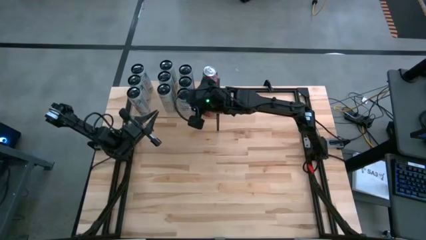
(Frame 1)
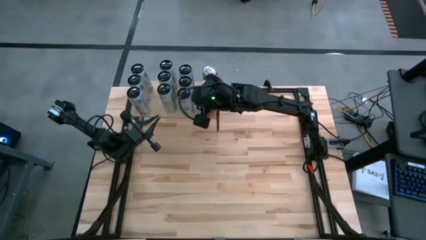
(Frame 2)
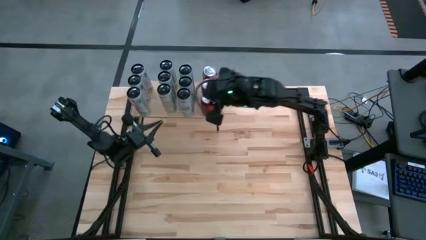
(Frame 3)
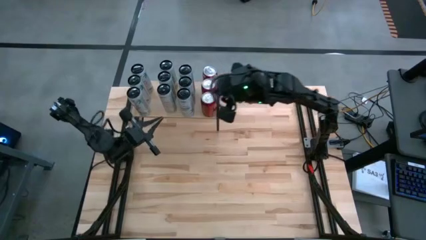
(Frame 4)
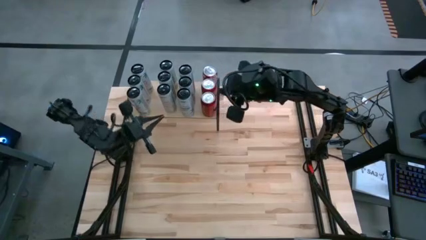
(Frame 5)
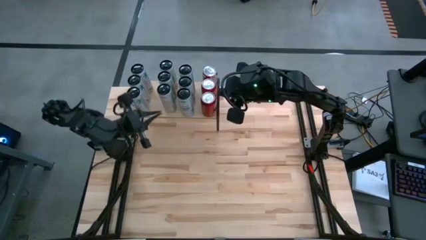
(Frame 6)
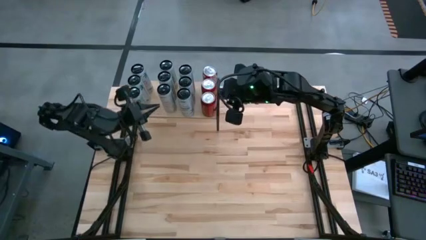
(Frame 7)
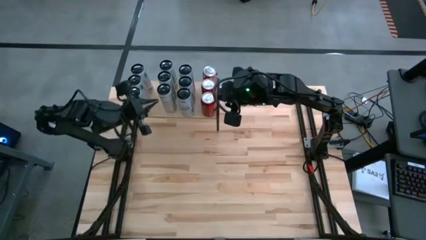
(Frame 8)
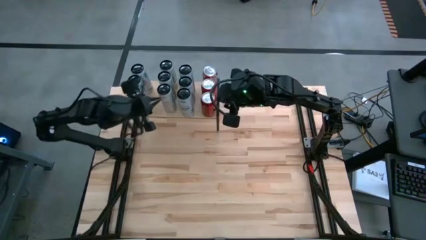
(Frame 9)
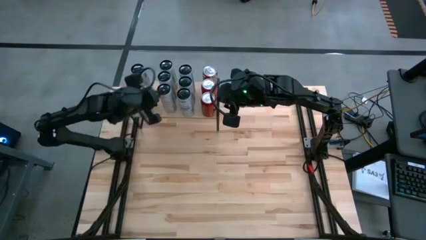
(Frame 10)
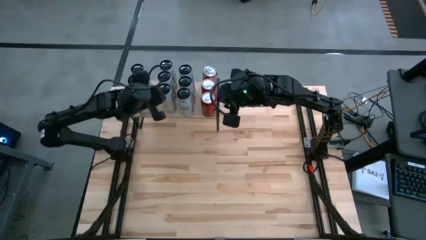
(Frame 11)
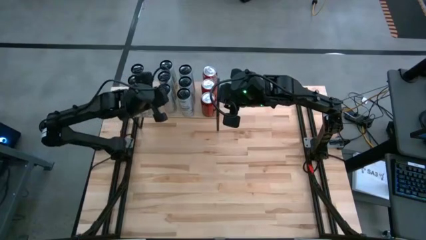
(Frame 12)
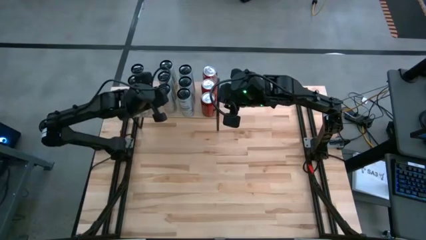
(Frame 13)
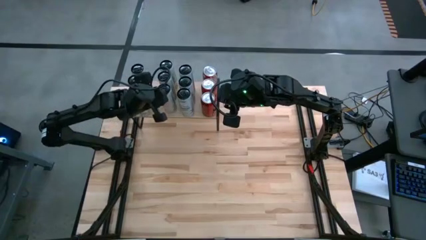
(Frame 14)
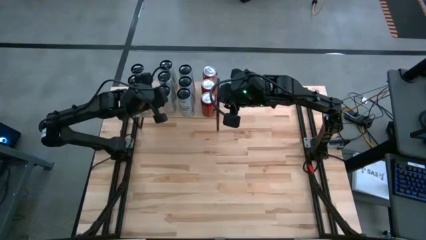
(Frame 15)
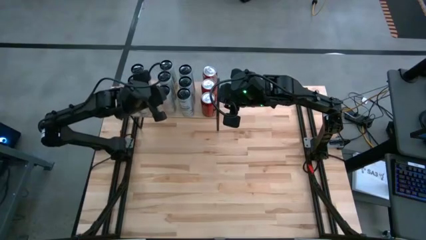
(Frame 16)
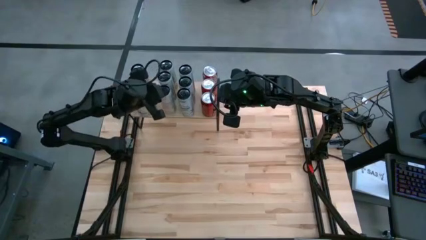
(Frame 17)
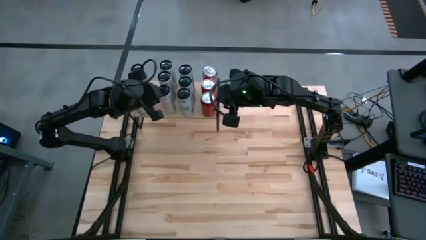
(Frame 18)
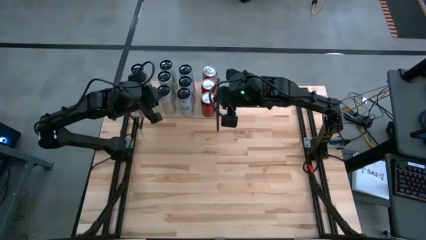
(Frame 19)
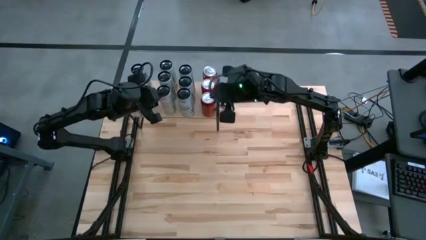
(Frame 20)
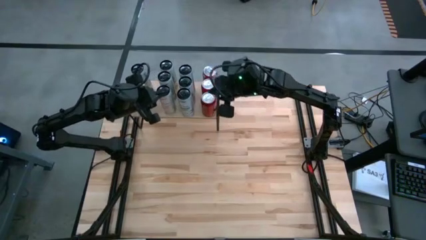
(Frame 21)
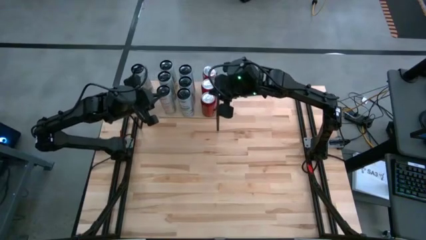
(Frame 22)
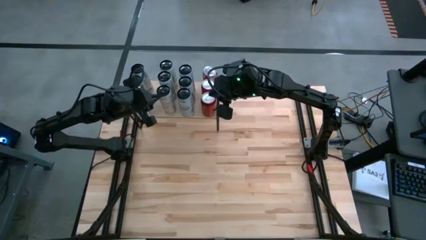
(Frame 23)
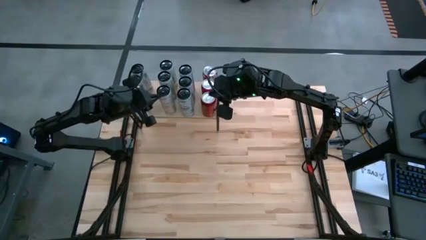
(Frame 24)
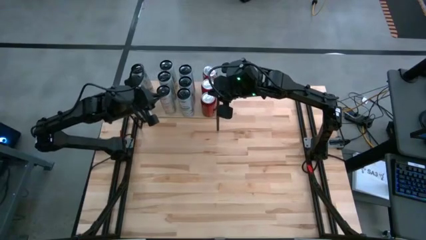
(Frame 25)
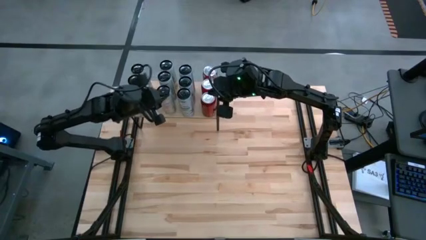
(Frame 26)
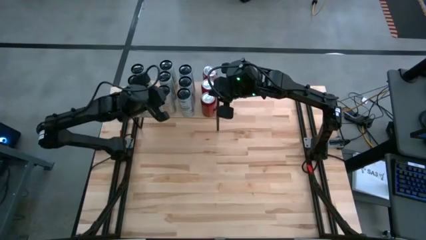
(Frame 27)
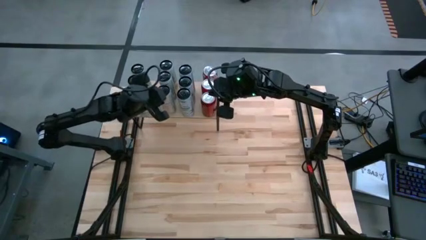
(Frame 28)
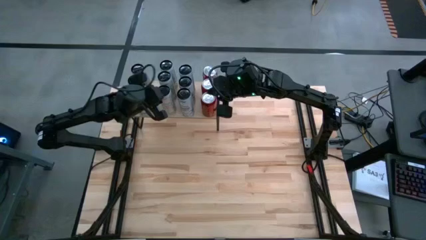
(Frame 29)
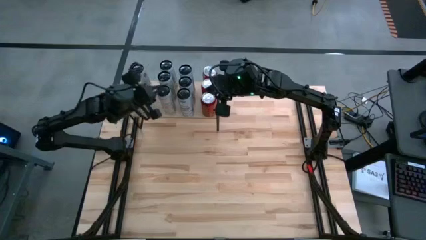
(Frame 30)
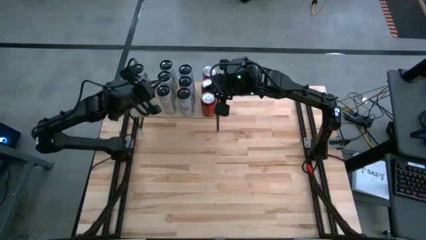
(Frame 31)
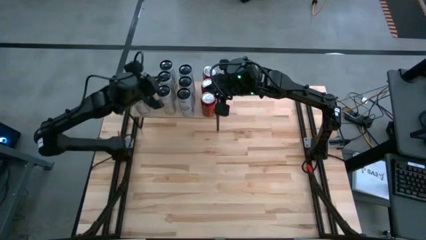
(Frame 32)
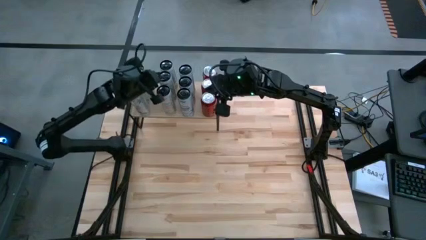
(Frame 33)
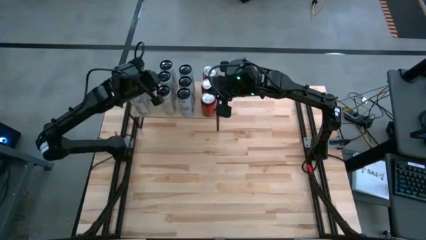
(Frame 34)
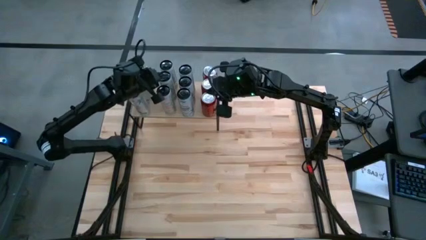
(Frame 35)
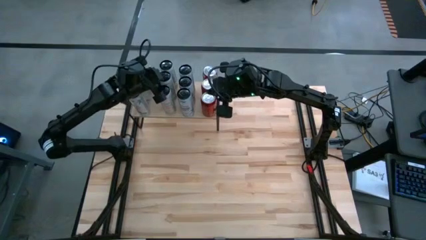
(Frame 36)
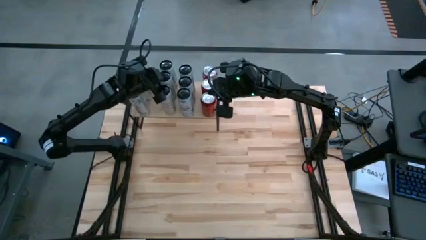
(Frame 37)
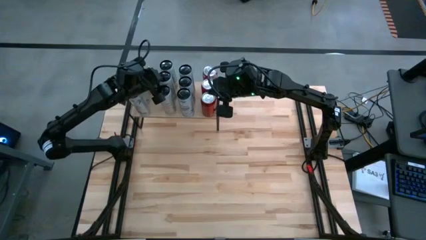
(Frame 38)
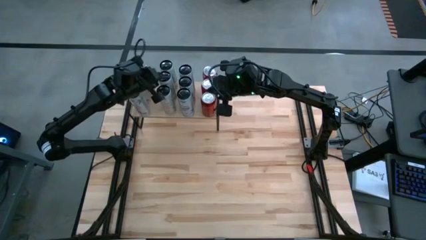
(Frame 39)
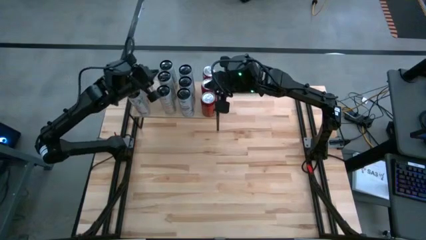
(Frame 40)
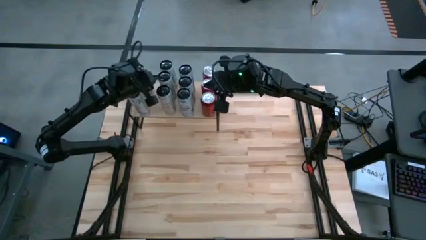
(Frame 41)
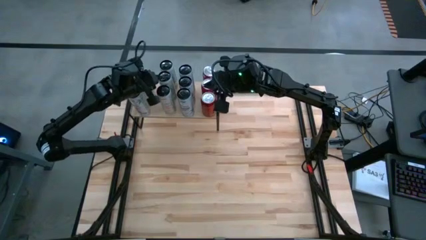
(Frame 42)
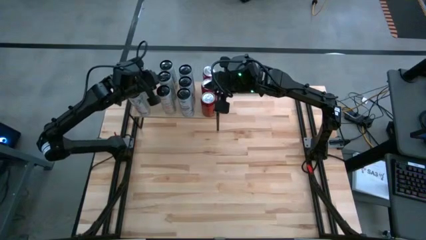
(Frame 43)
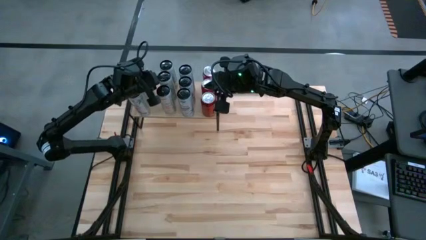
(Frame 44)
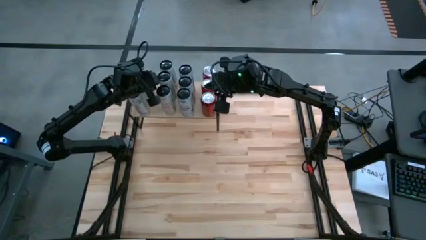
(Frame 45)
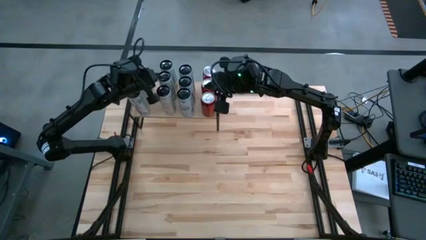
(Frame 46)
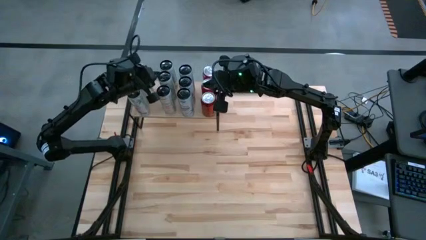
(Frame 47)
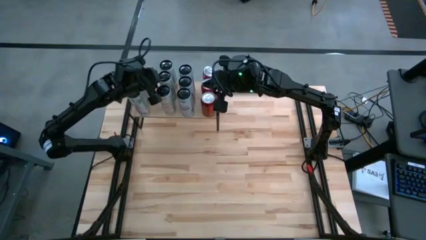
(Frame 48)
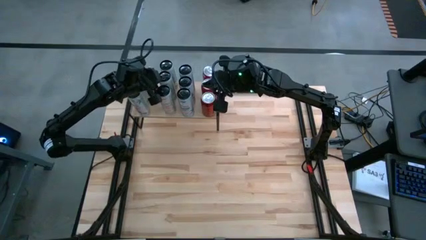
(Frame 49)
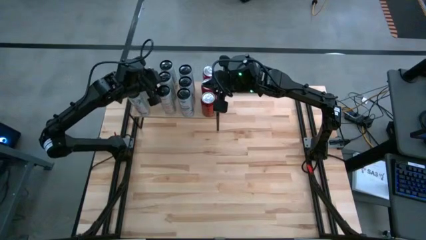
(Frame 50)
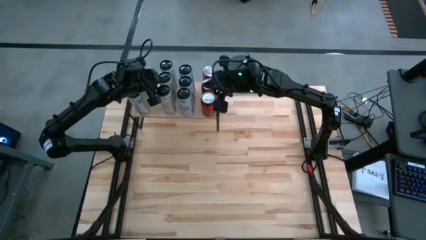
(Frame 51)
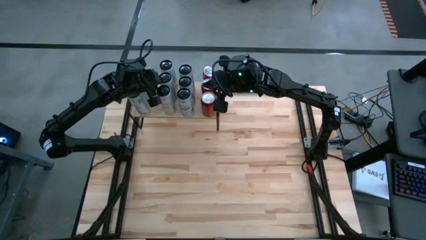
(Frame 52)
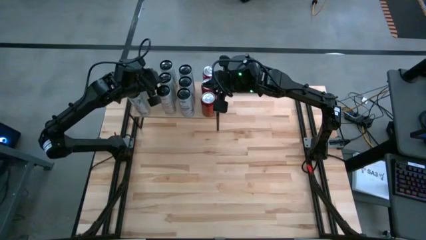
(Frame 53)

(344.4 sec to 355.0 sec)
Task: Place canned beverage on shelf
Adjust the white yellow soda cans on the shelf

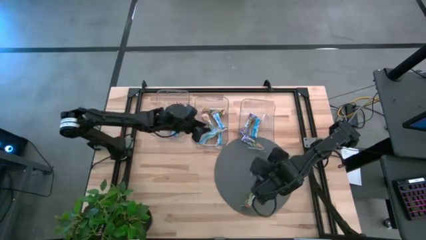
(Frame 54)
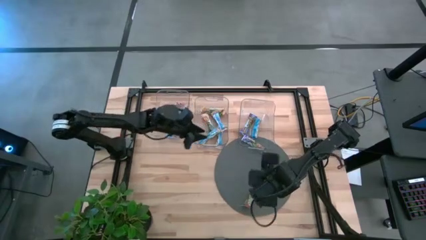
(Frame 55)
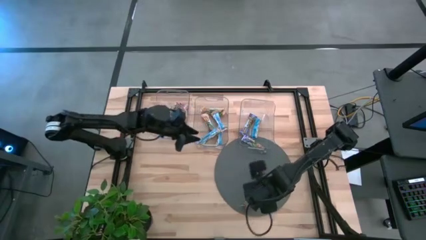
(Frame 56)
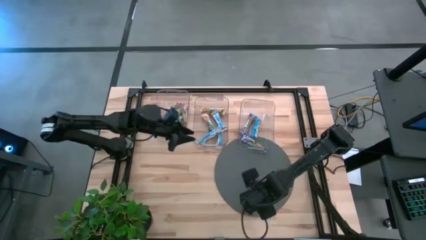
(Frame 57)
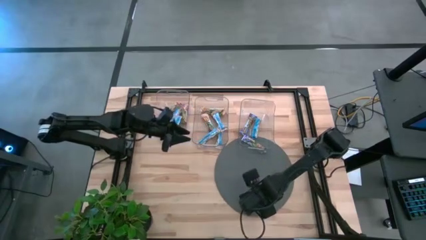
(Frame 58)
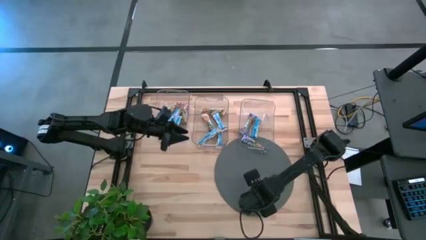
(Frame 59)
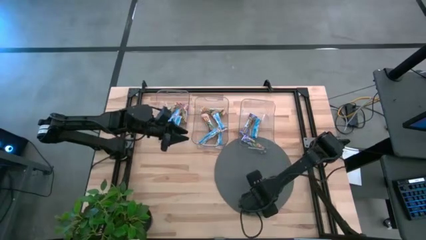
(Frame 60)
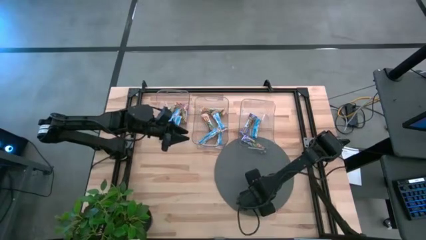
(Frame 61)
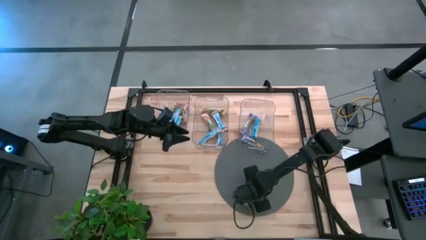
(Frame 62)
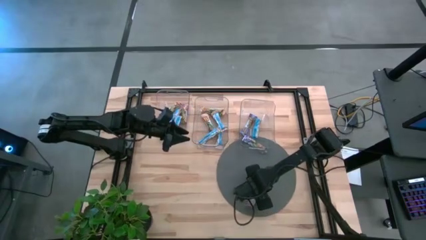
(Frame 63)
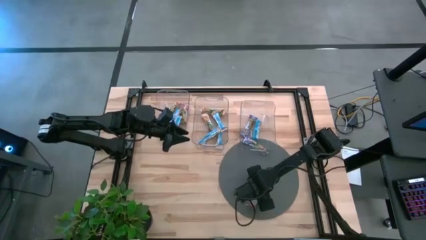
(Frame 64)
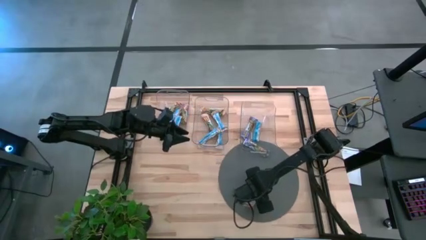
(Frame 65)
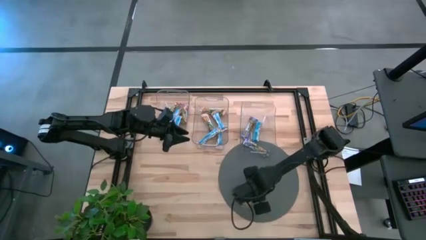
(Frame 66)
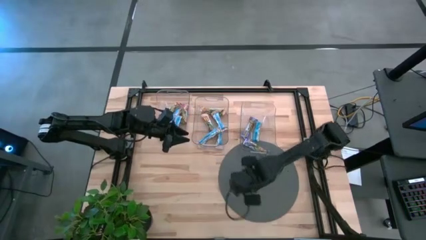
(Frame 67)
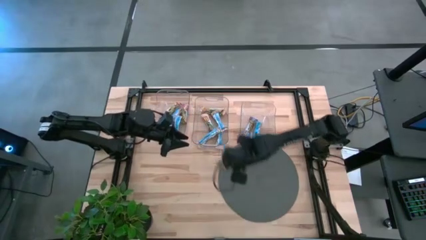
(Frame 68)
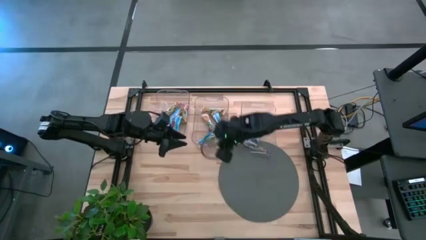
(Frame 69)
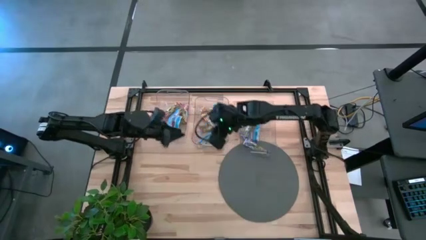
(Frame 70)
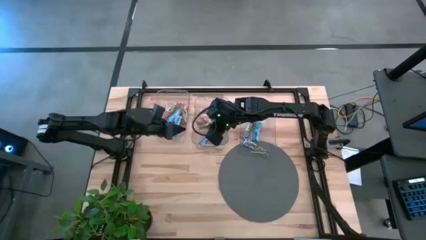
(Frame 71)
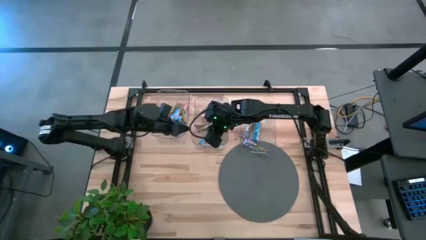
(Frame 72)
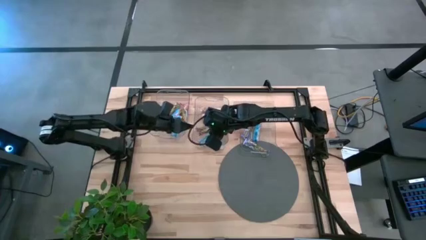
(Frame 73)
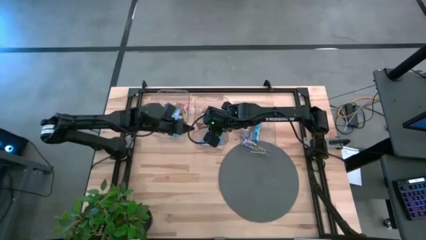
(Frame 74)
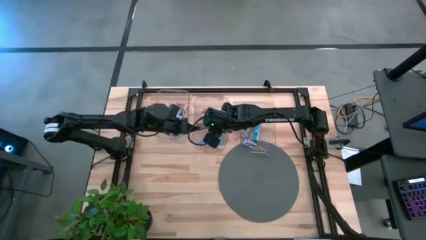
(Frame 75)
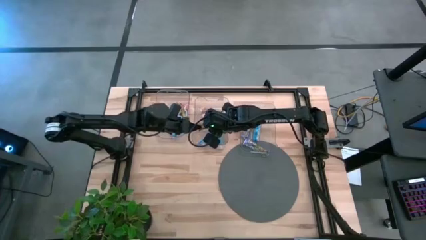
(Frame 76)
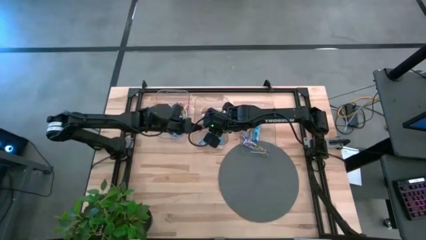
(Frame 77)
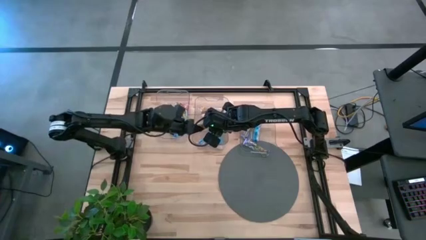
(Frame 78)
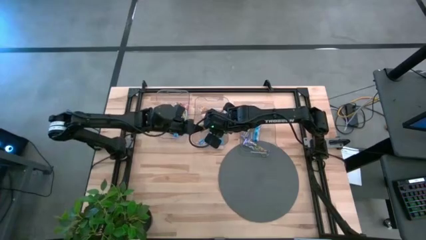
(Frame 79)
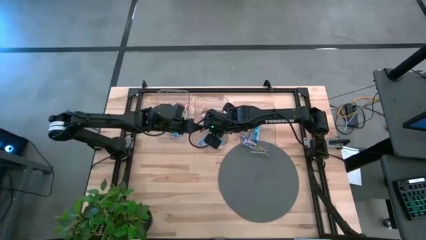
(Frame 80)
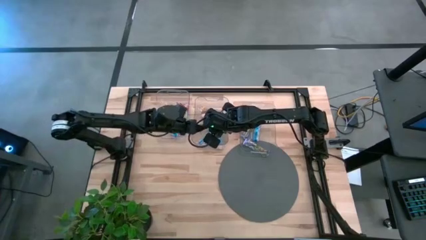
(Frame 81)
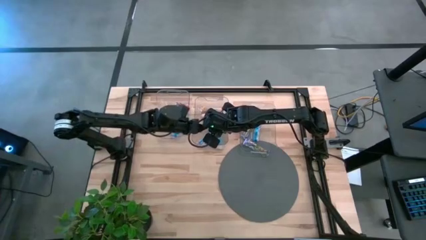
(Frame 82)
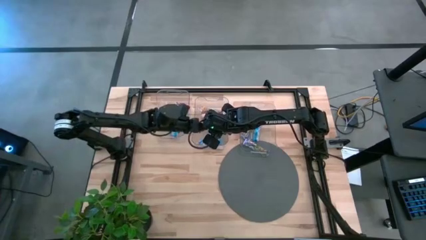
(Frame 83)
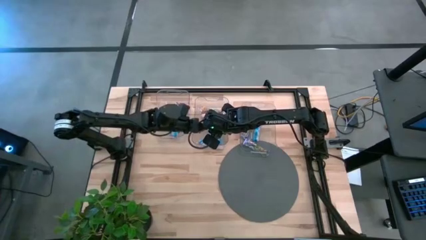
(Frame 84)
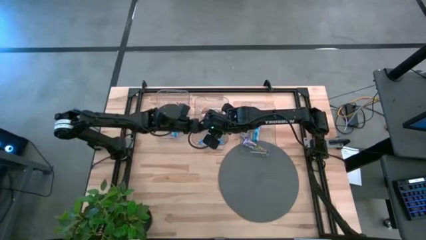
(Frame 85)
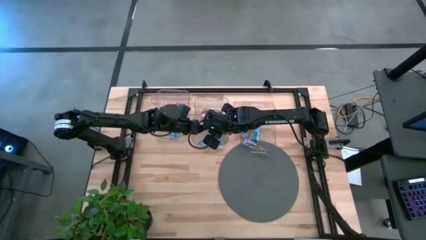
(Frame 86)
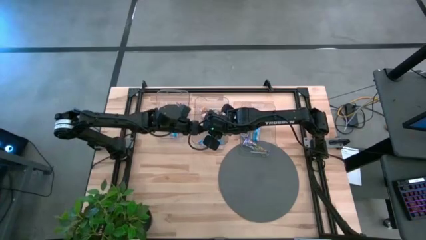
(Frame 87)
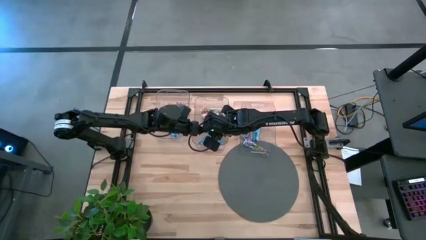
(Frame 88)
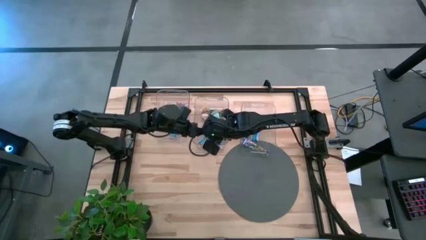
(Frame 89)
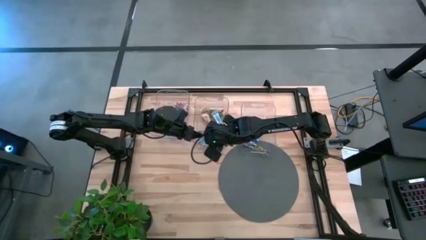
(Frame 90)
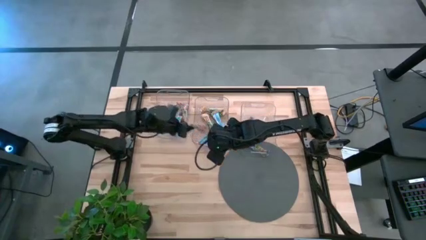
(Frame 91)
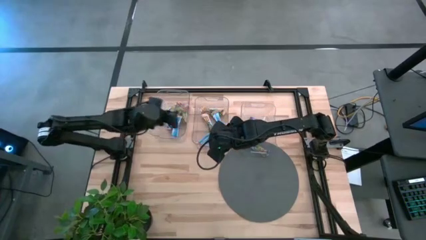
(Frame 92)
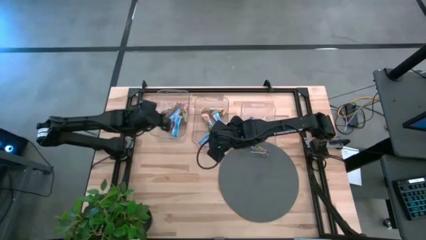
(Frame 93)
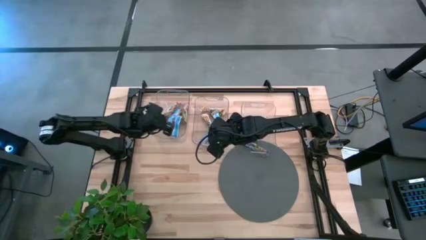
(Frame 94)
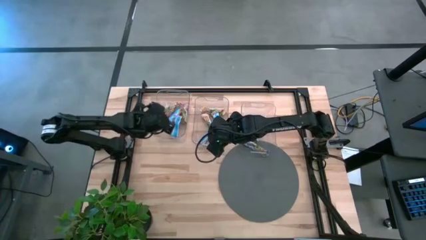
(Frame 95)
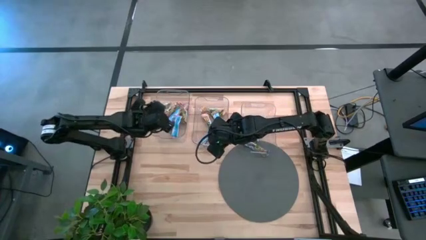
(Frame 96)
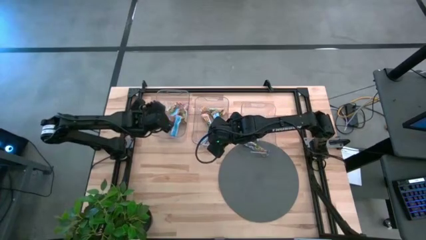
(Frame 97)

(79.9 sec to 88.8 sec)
Task: Pick and place Granola Bars by type
Put the red snack bar into the left transparent bin
